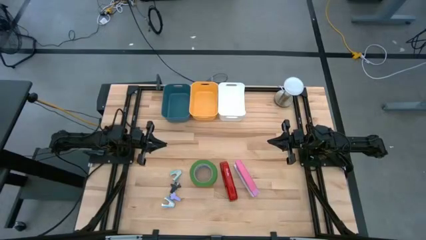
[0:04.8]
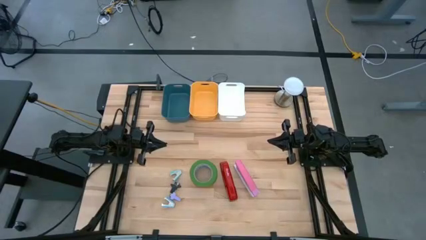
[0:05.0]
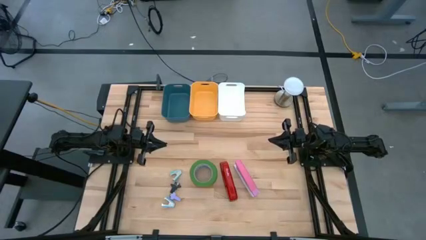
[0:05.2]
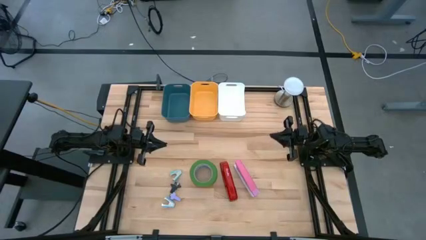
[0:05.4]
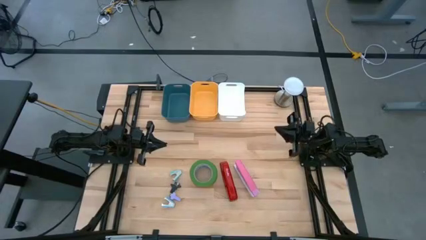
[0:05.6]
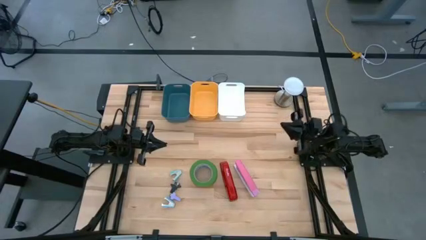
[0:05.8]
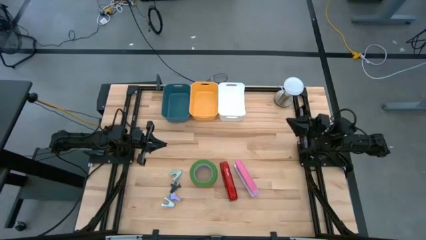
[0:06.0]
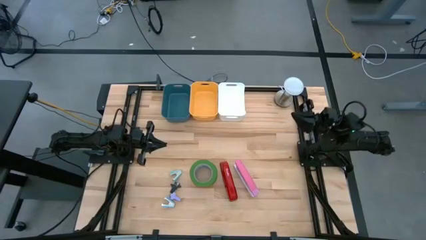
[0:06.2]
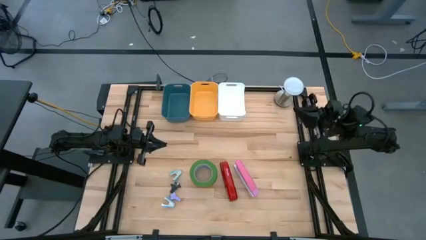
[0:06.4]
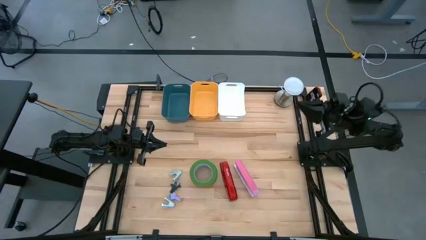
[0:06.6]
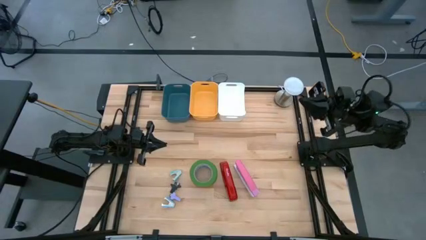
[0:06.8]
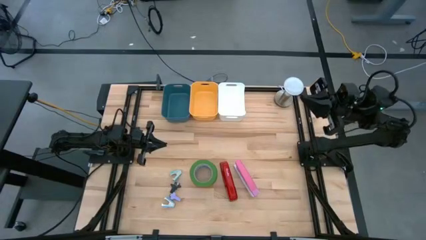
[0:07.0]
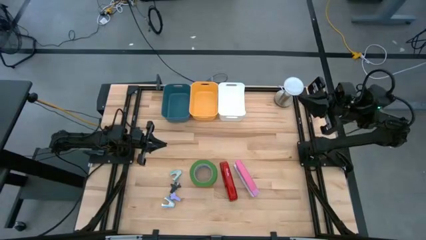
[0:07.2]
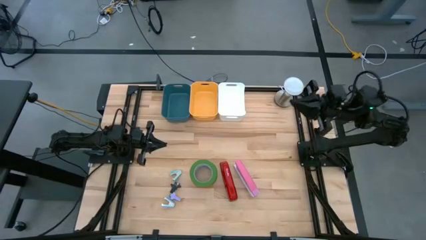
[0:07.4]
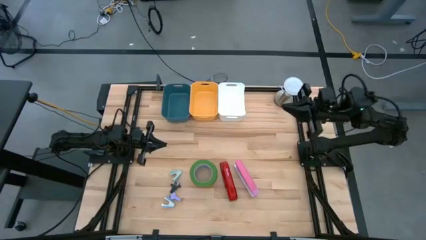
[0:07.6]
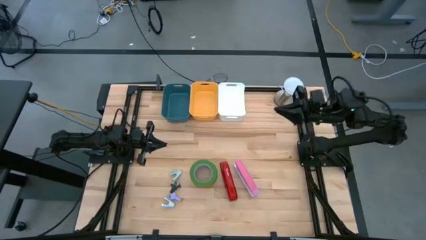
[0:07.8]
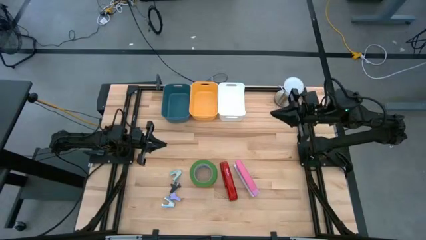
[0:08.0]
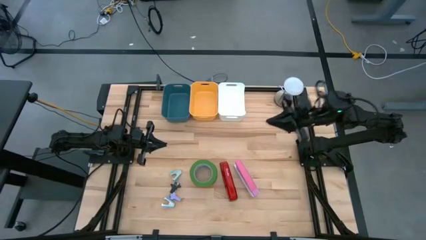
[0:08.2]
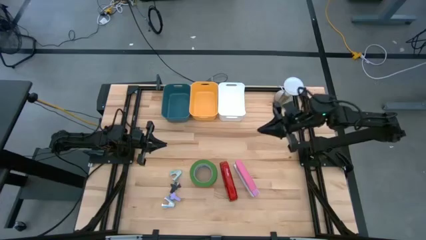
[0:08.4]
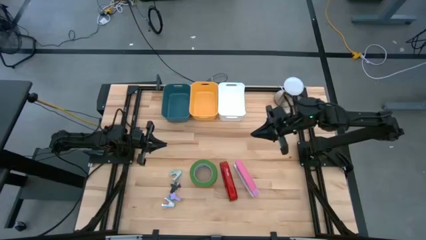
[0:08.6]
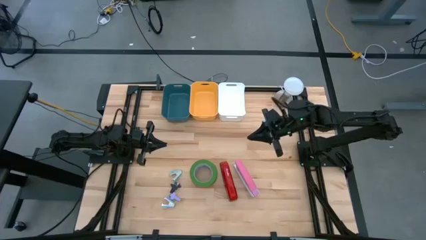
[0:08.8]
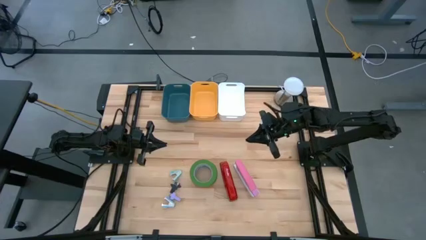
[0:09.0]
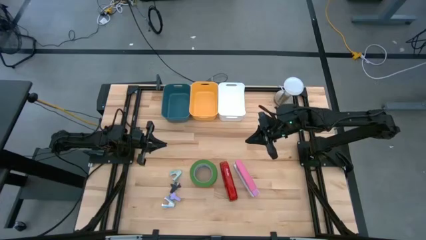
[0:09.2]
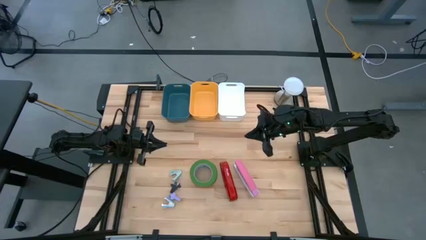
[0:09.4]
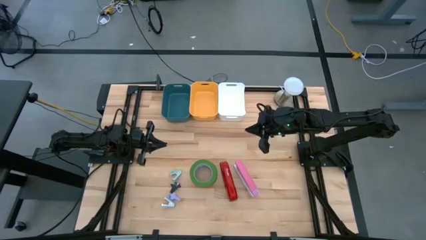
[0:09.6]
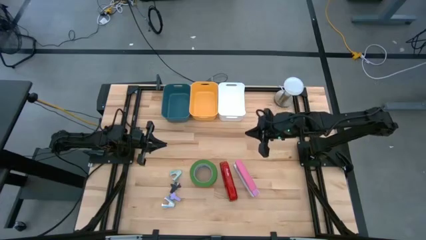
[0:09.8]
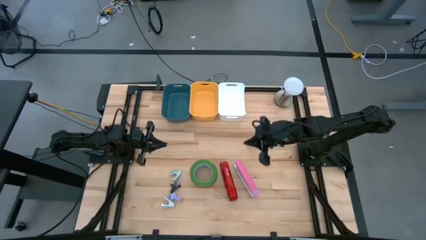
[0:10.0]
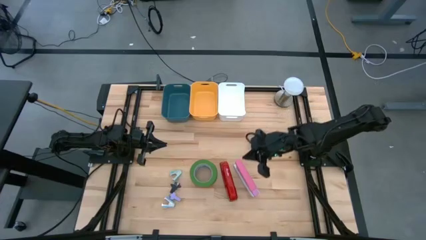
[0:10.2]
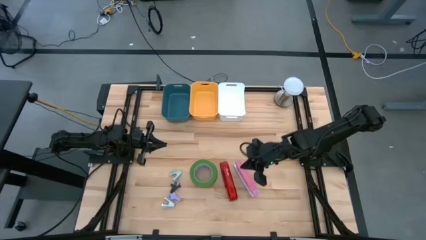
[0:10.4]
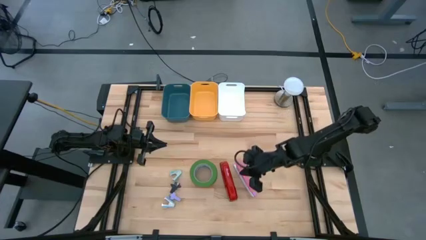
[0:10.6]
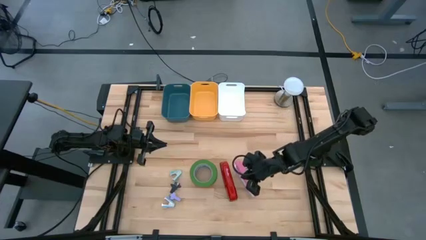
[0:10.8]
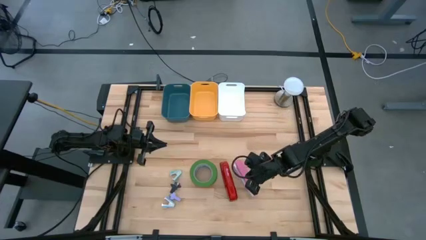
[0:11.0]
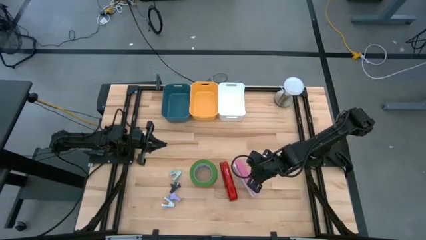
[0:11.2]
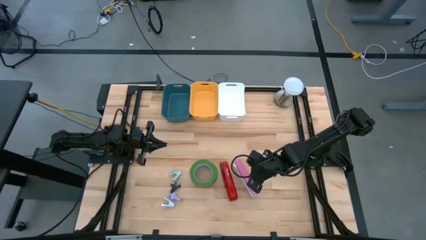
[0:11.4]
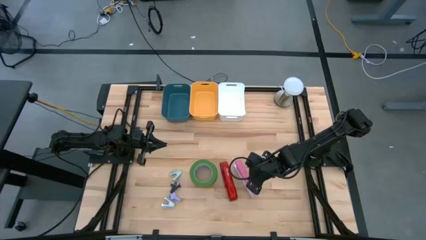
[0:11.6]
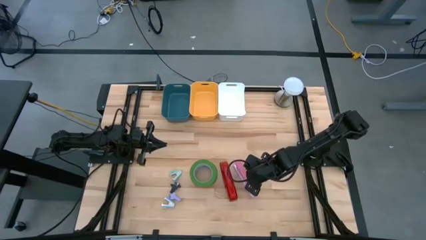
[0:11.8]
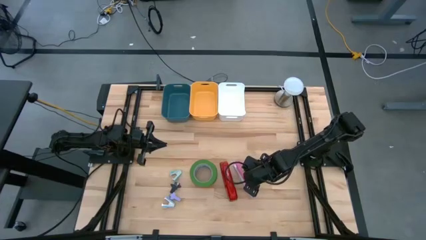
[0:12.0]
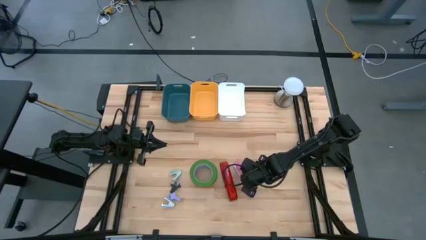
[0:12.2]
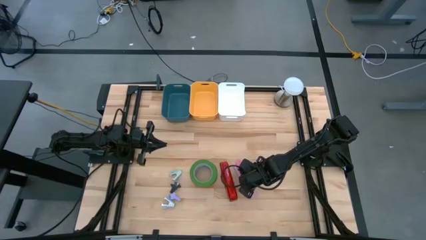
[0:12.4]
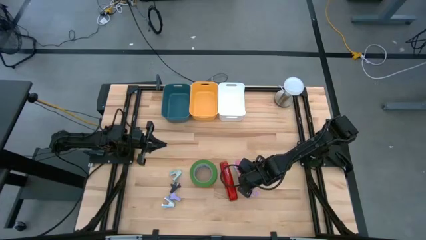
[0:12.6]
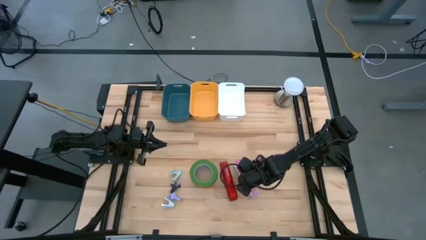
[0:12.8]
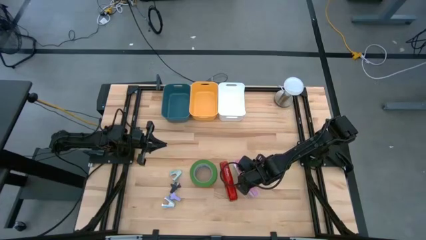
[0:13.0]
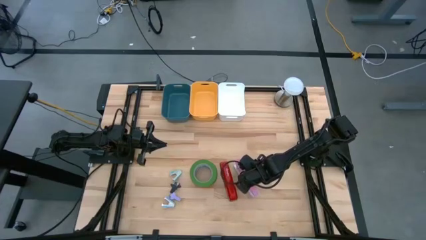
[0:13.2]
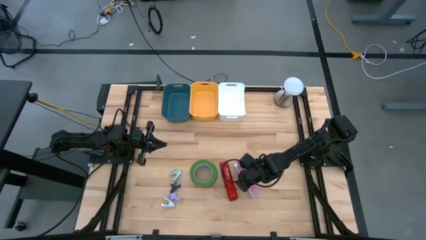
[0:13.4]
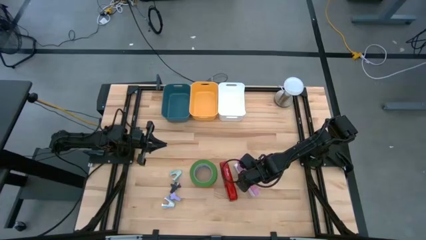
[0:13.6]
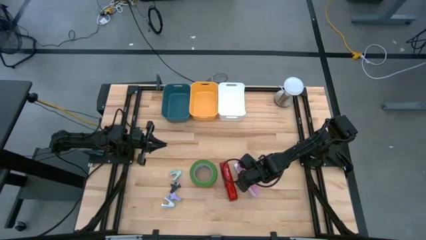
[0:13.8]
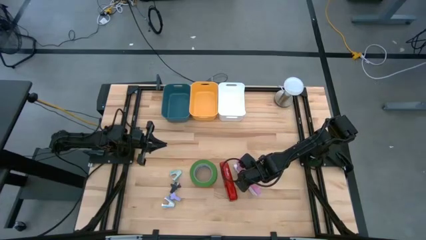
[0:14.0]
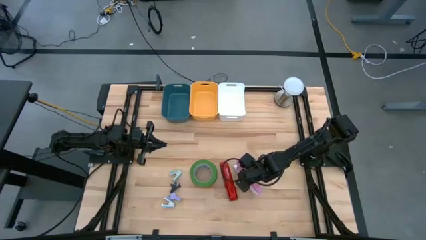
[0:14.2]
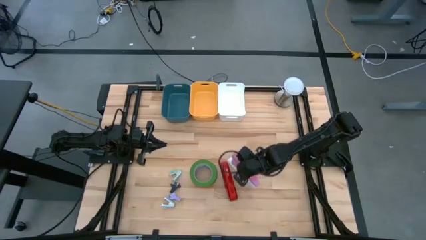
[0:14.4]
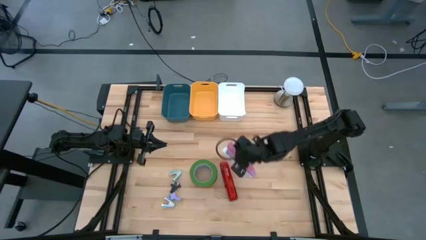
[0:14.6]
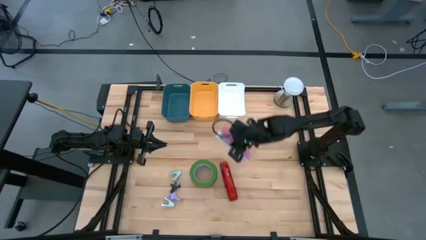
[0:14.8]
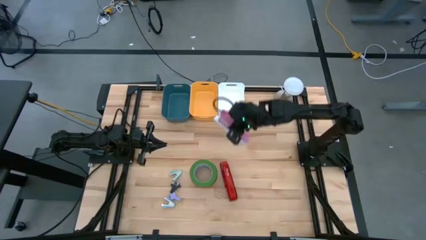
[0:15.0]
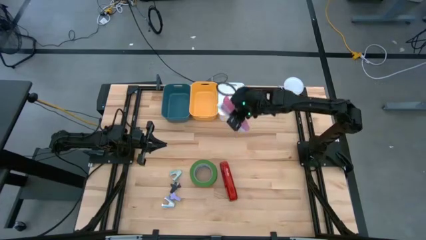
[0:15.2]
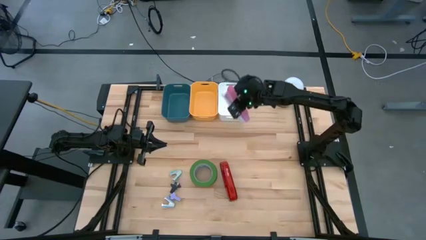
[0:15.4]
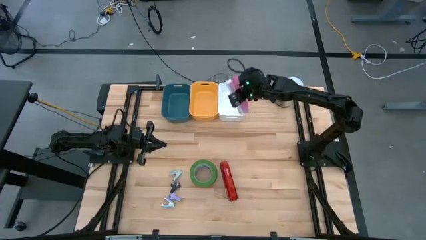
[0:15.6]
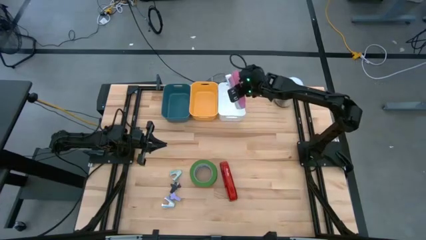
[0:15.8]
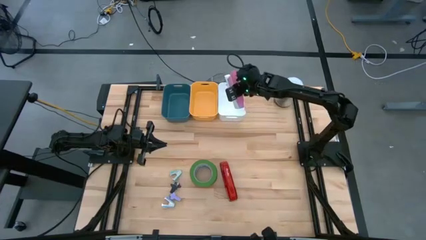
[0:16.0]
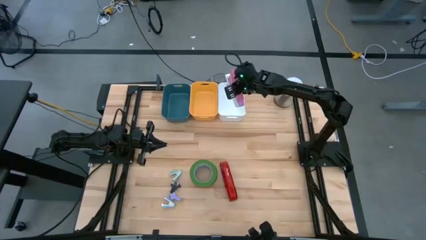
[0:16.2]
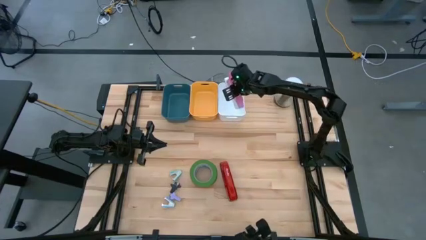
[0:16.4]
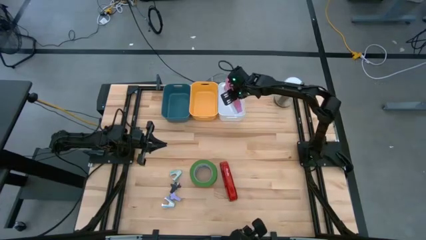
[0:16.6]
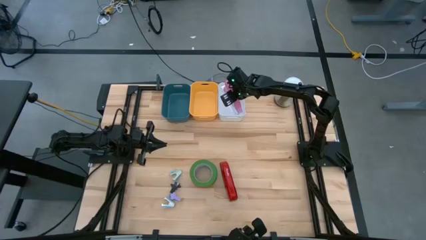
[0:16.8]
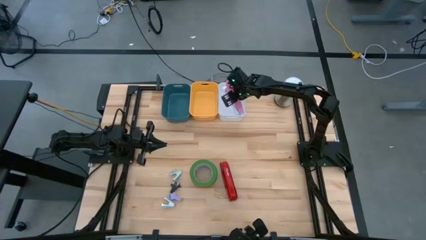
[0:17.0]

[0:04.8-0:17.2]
Task: Pick and place Stapler, Stapler remover, tape
Put the pink stapler into the white bin

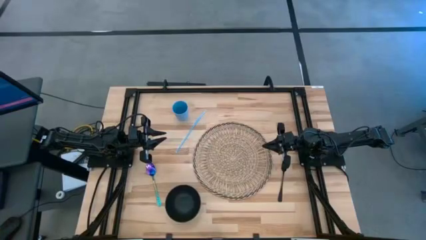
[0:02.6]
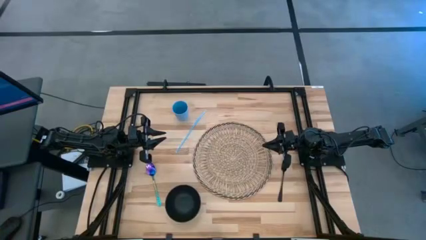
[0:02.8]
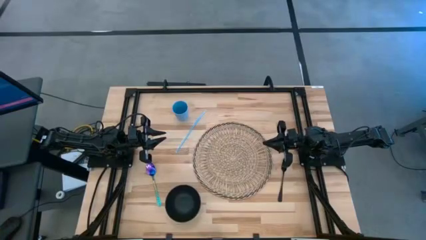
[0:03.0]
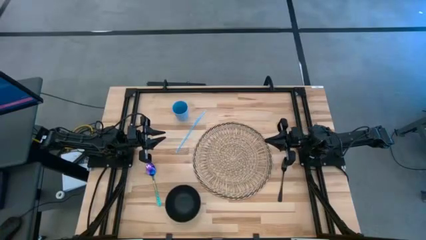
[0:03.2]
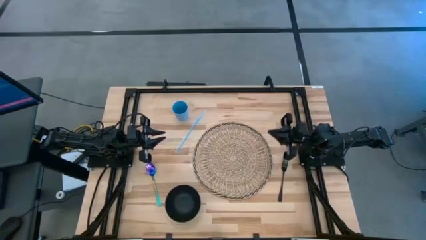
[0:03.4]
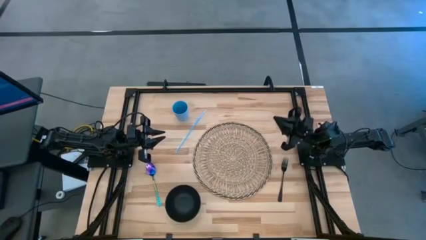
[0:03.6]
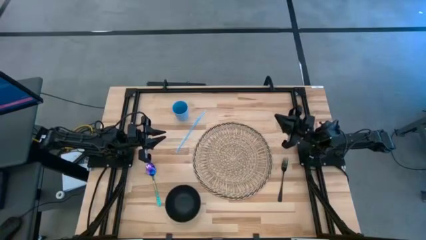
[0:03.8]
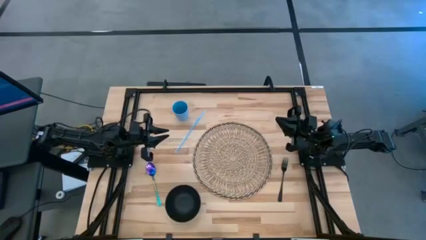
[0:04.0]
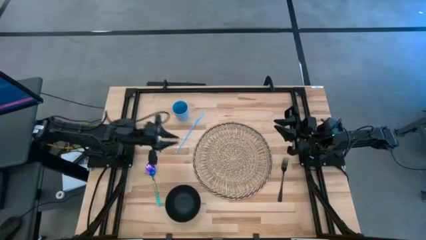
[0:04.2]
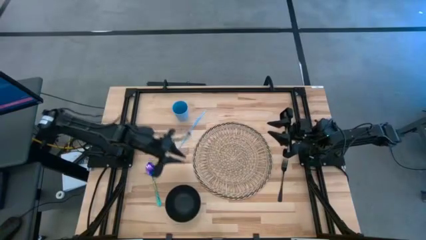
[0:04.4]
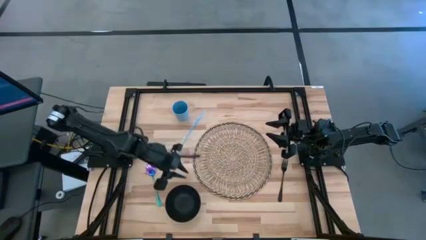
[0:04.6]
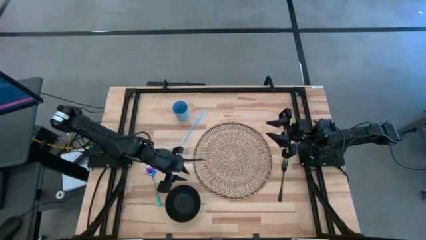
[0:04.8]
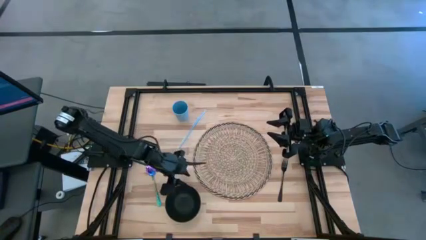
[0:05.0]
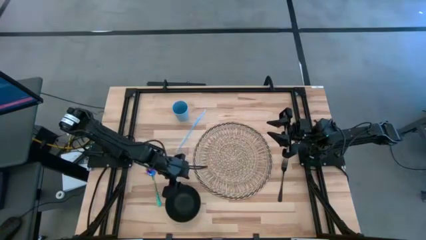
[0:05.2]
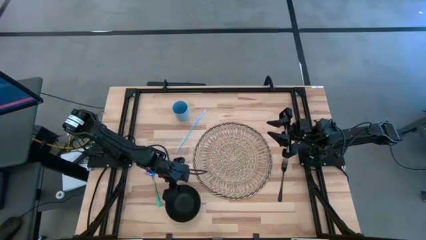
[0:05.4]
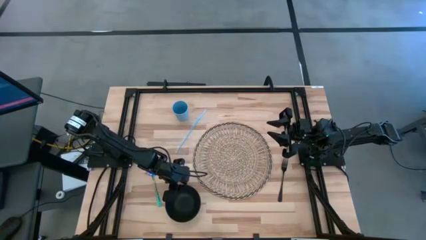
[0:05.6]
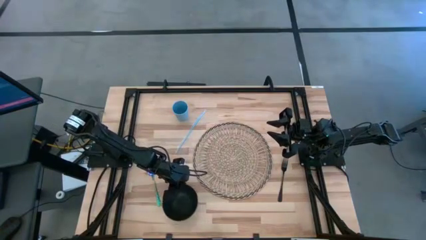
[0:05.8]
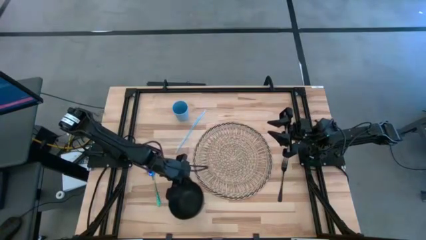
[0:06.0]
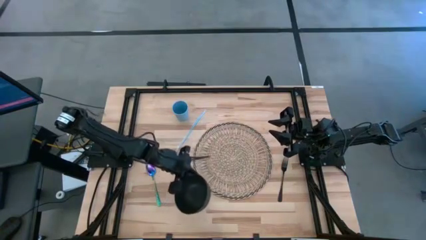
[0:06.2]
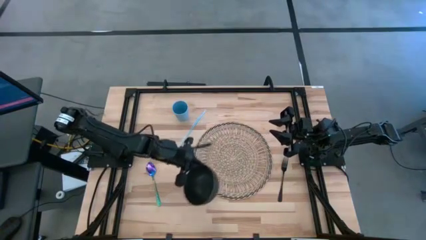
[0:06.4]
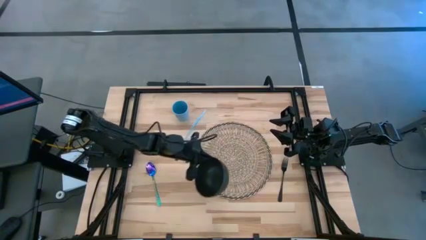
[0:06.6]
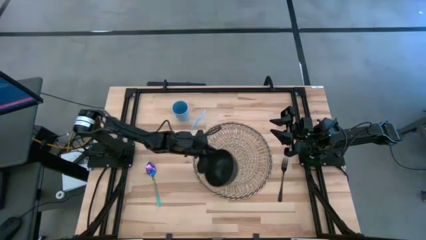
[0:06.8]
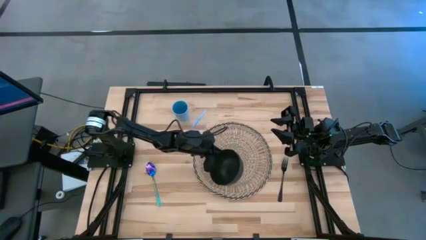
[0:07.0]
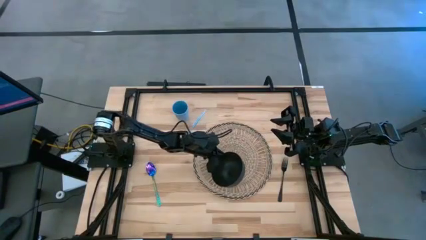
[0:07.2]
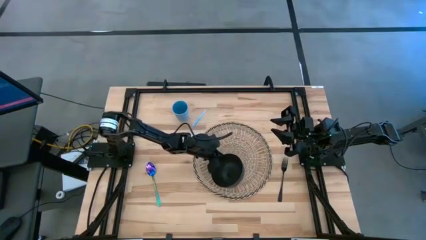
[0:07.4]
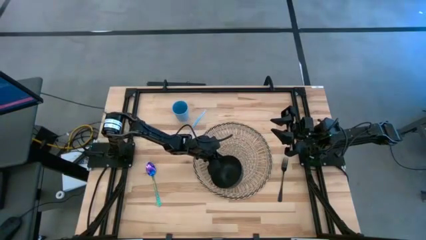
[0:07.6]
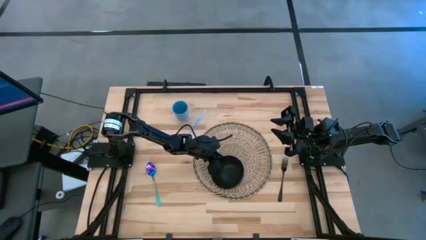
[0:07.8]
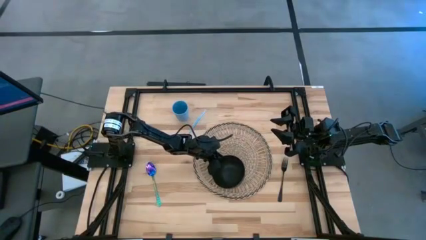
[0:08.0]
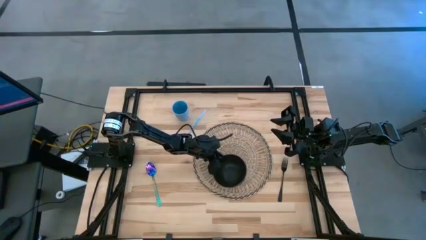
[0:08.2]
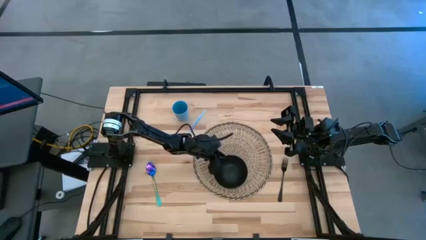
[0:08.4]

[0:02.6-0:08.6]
Task: Pick & Place Utensil
Put the black bowl on the brown mat
